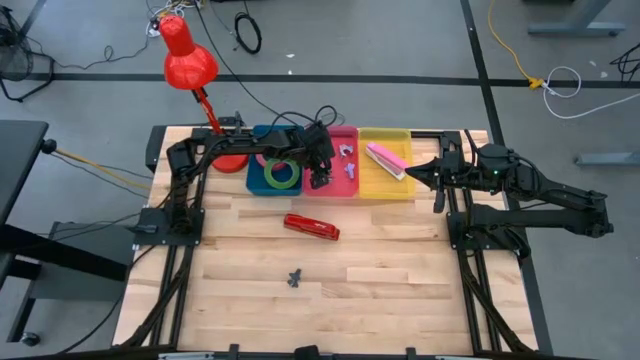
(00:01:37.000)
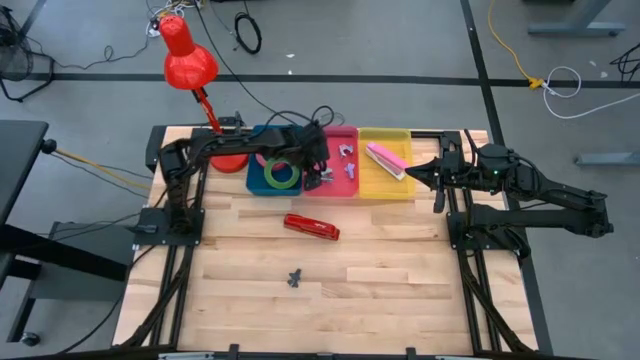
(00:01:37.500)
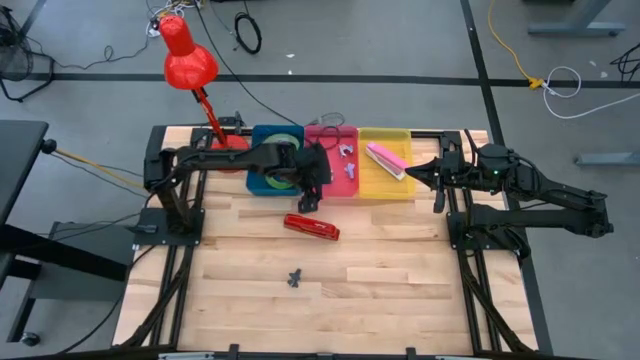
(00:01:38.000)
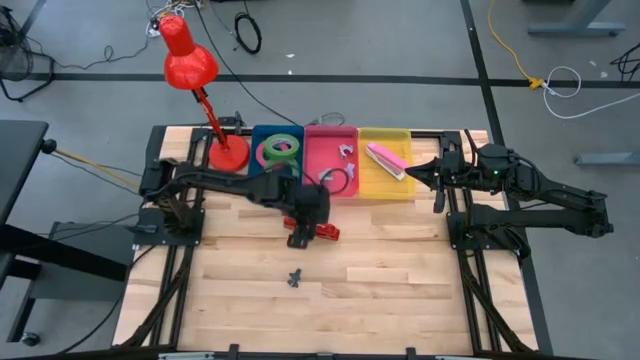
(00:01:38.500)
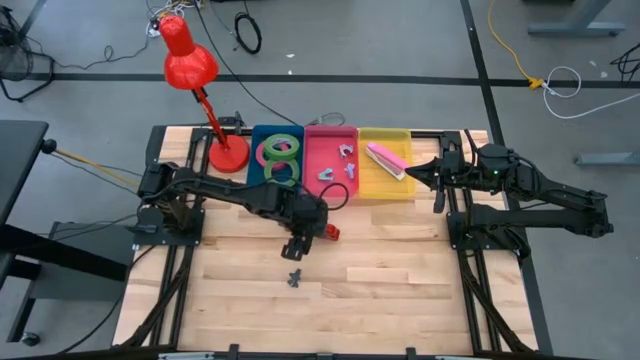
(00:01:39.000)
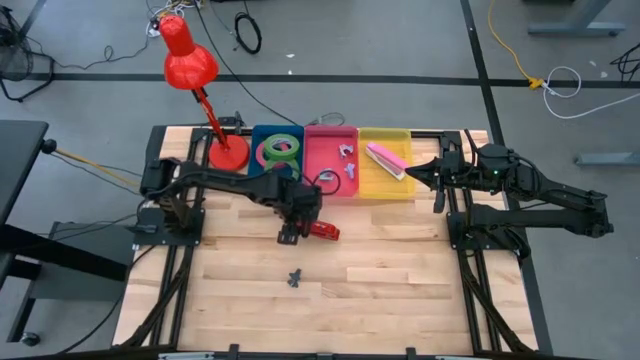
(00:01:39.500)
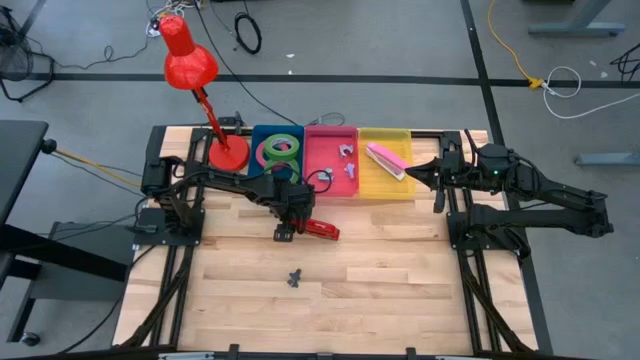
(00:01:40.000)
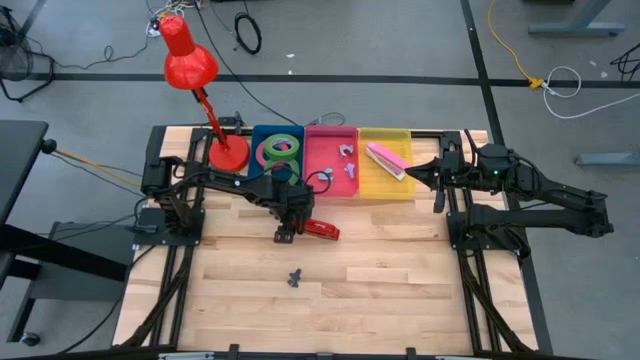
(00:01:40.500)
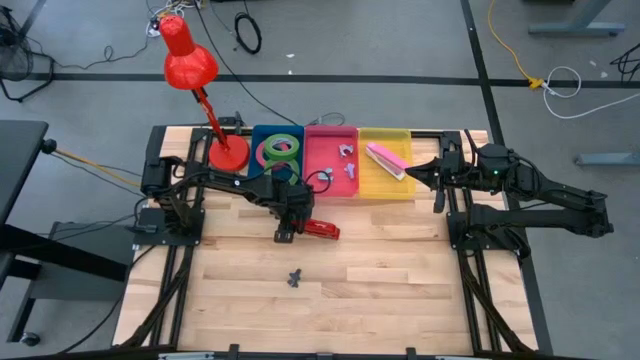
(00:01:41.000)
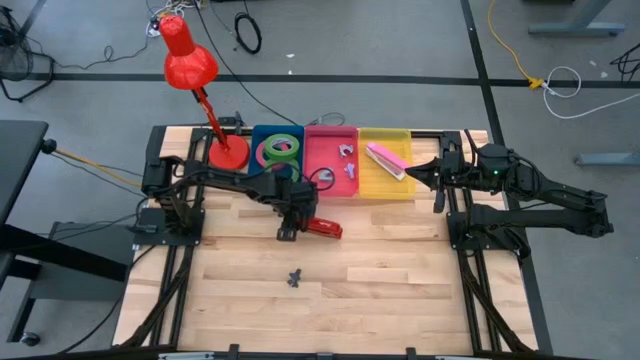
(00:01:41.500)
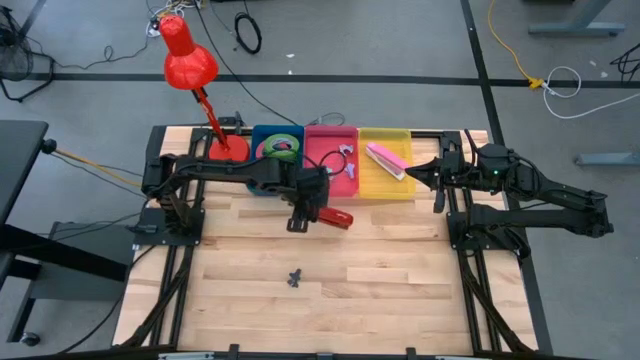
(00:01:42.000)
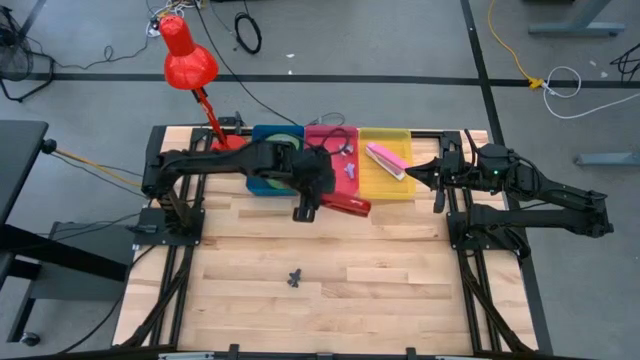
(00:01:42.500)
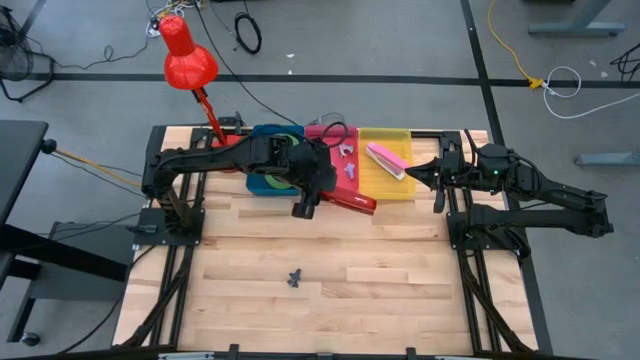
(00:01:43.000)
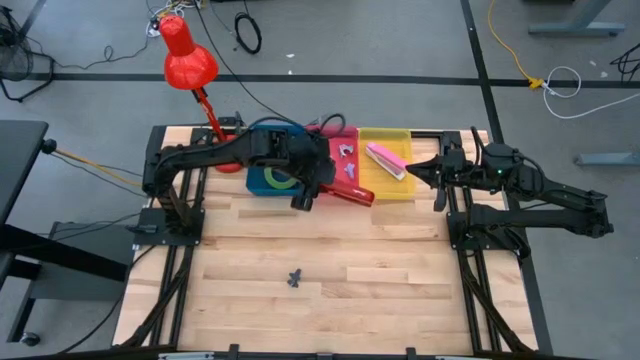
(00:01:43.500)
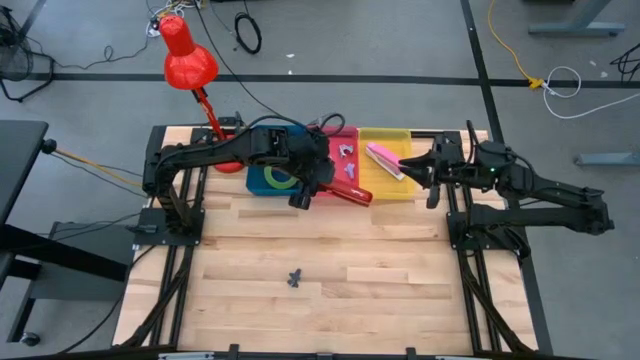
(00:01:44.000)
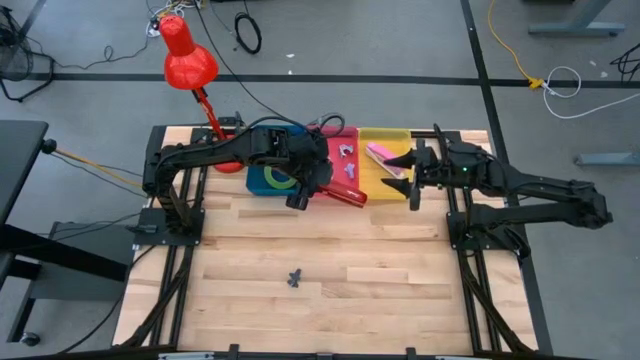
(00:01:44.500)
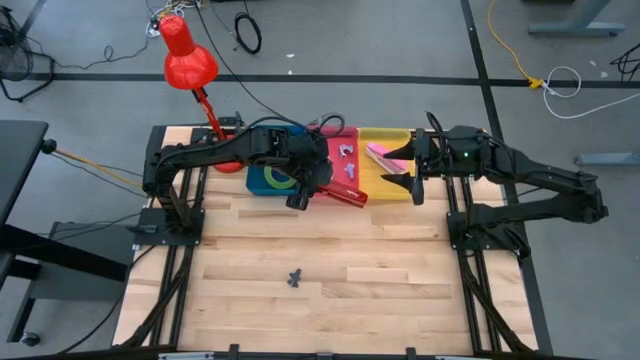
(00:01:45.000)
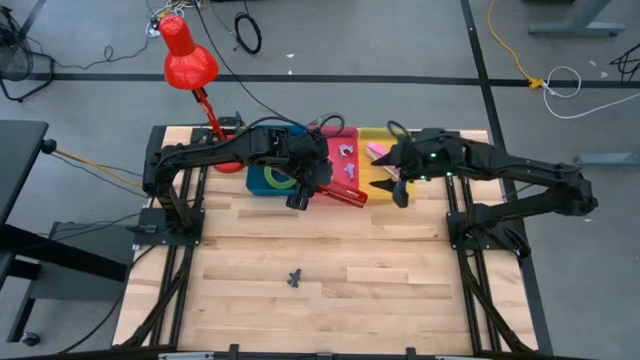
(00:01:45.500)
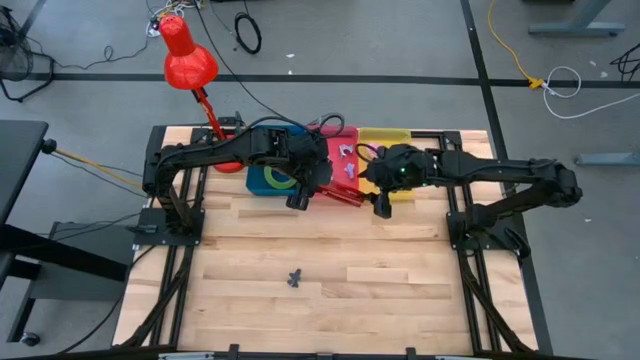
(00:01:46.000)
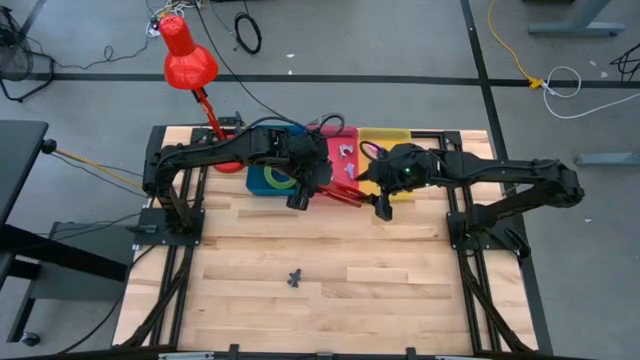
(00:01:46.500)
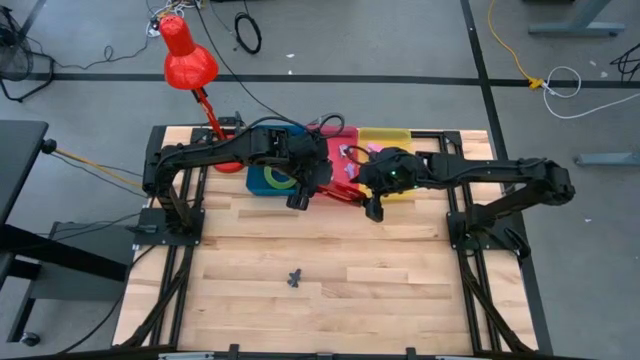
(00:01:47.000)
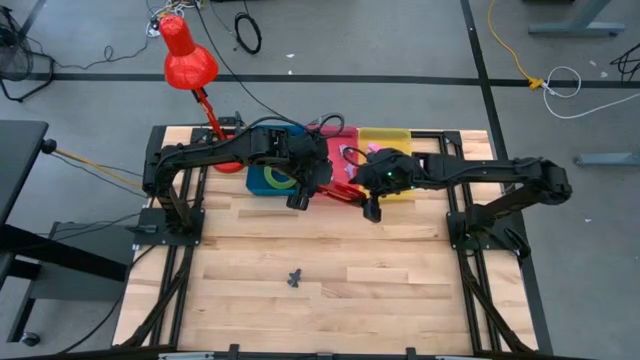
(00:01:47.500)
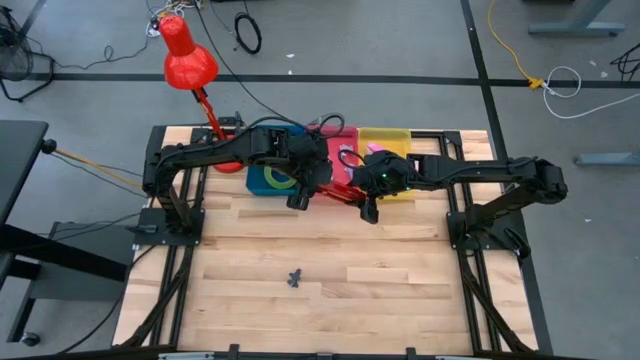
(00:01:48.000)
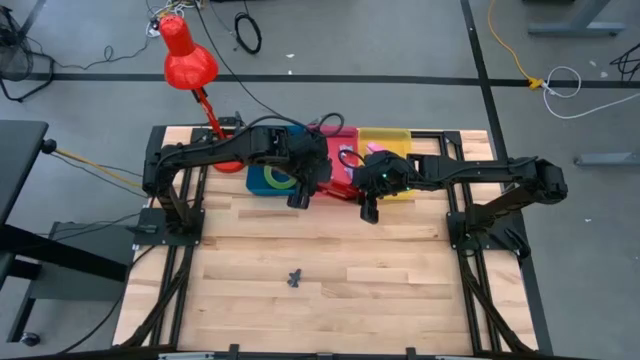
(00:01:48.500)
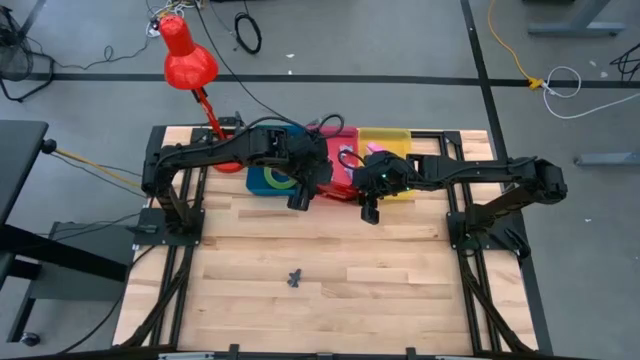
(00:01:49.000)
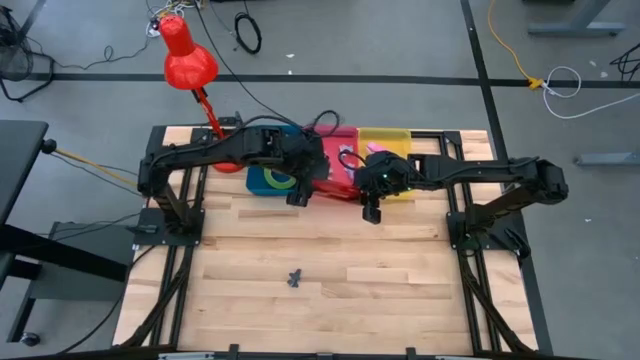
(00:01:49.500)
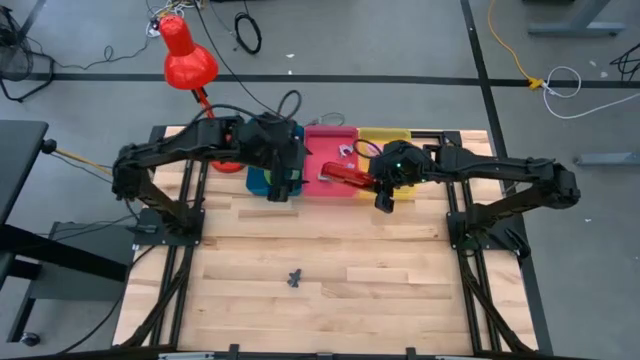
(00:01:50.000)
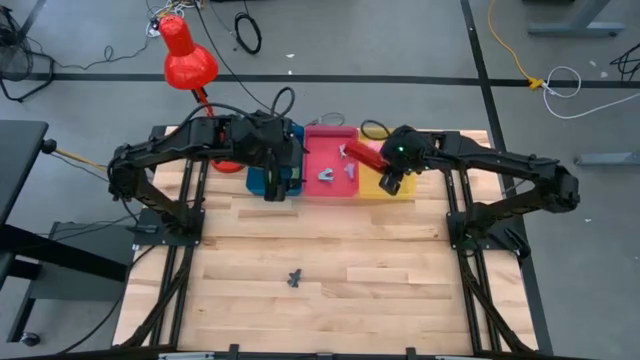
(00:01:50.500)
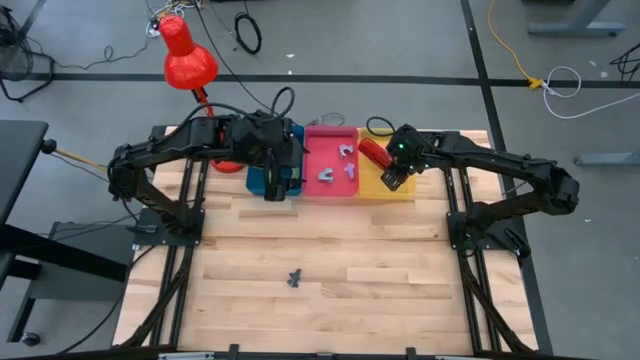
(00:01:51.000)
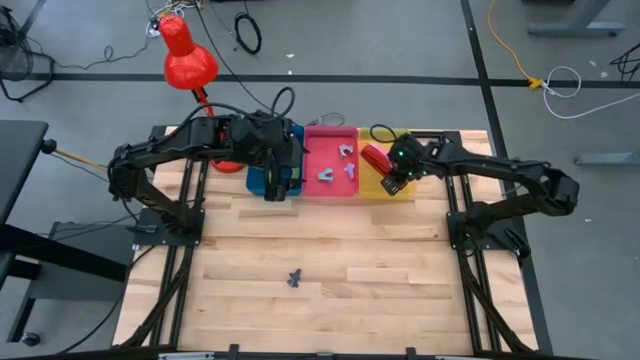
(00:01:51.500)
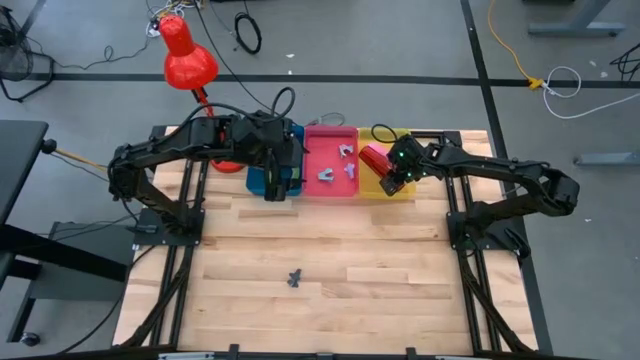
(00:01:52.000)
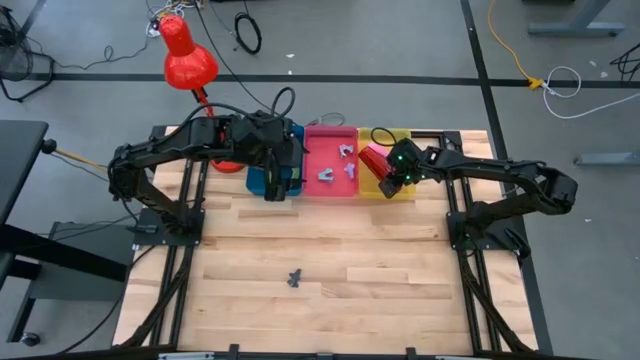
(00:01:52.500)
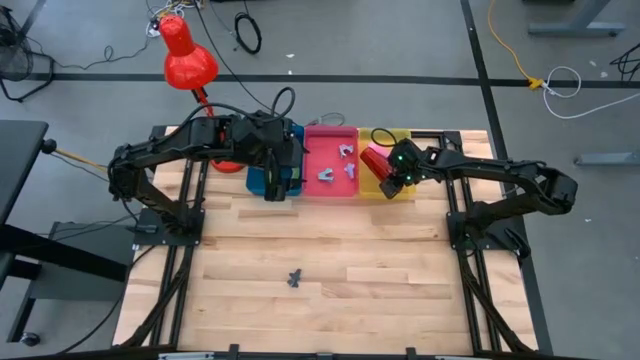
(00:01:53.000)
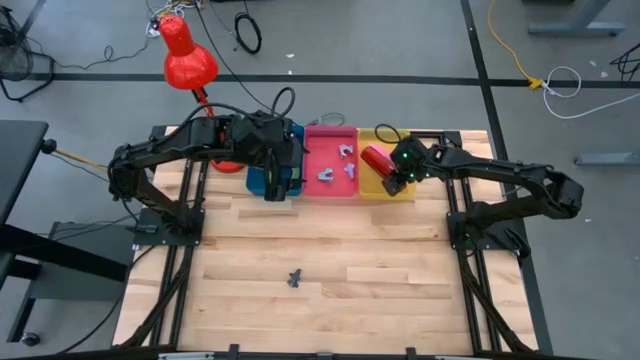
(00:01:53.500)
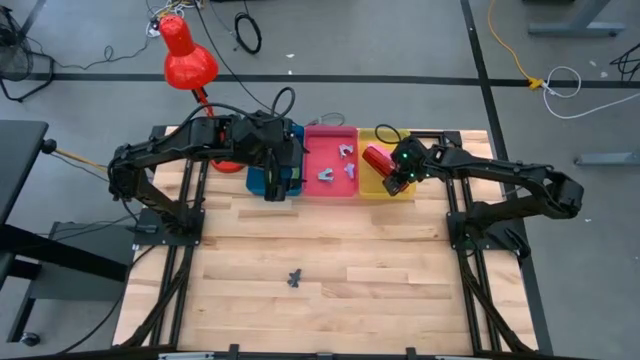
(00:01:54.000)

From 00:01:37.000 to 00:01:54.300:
Task: Pick and place Stapler, Stapler remover, tape
Put the red stapler into the yellow bin
